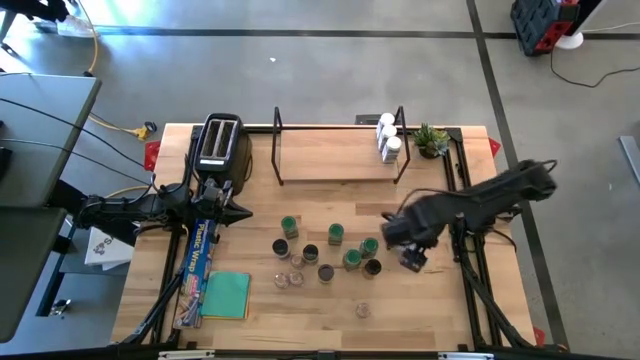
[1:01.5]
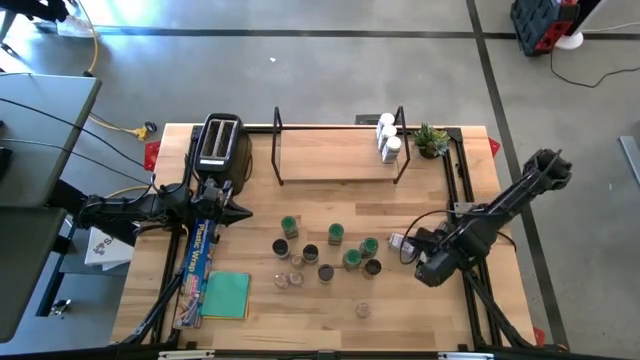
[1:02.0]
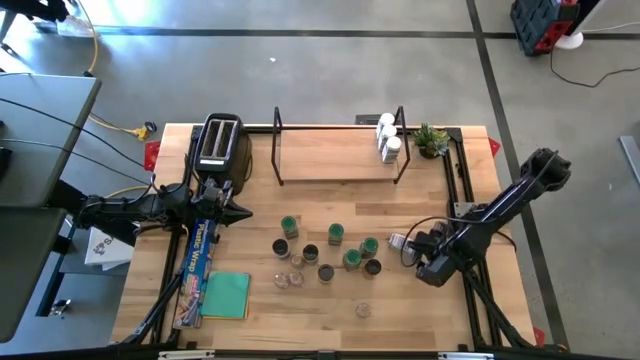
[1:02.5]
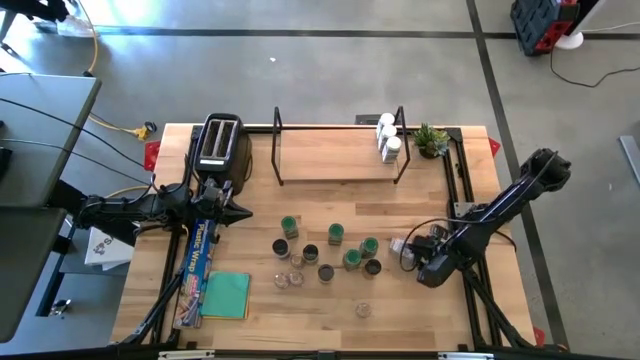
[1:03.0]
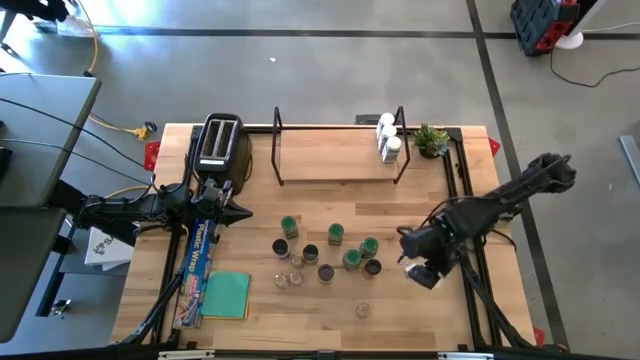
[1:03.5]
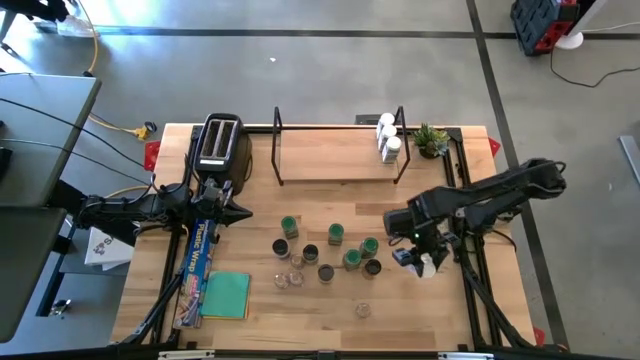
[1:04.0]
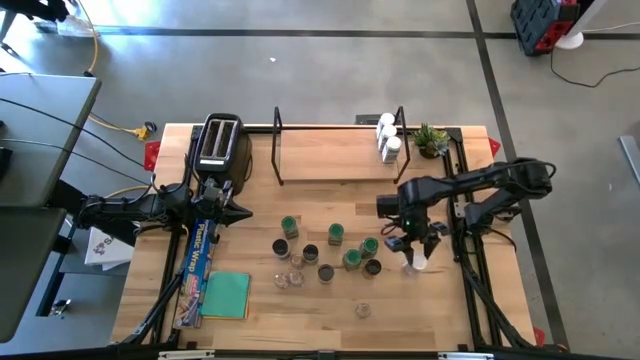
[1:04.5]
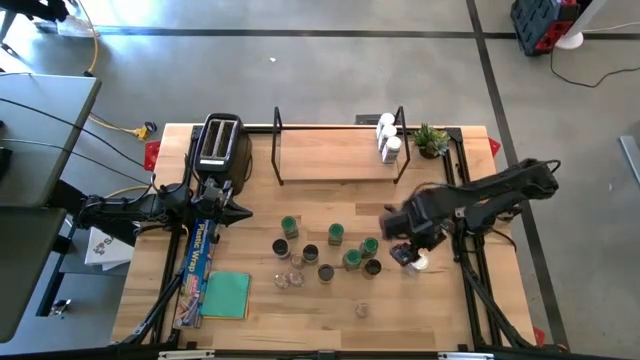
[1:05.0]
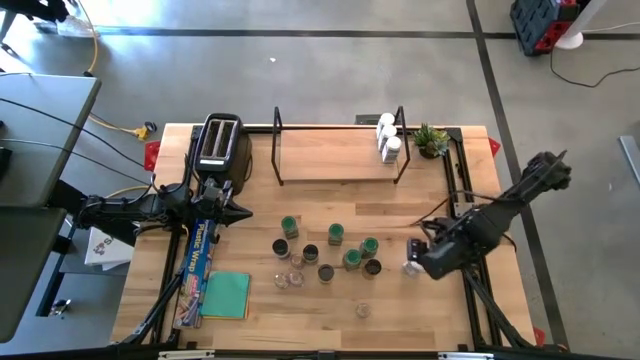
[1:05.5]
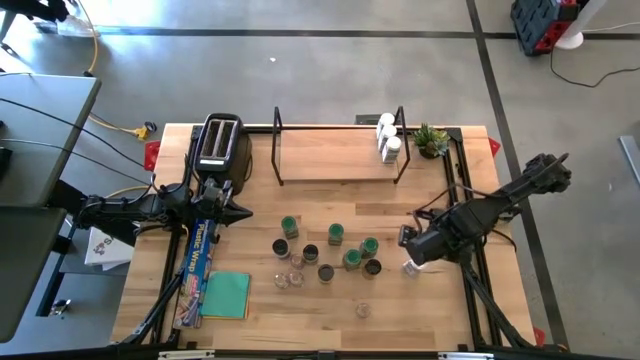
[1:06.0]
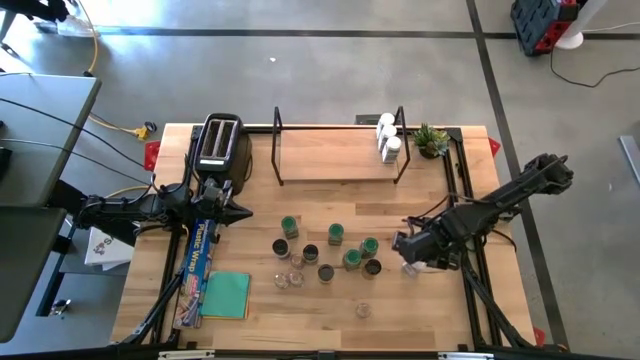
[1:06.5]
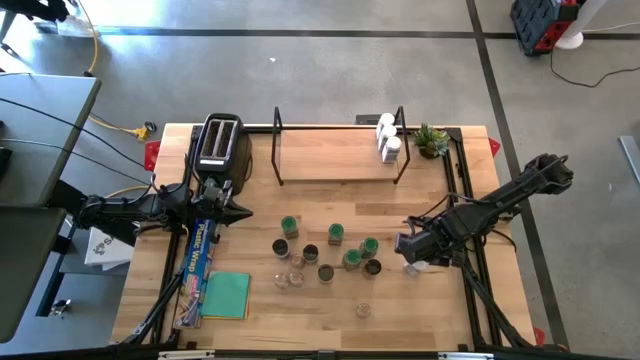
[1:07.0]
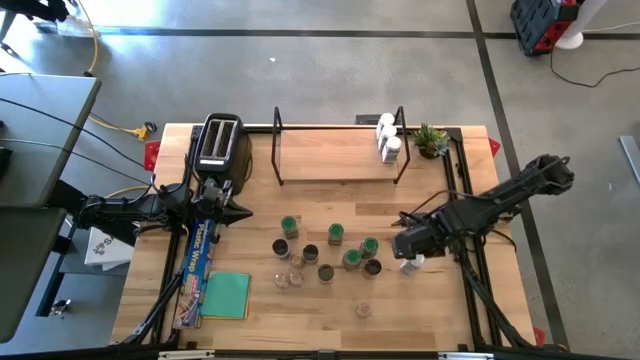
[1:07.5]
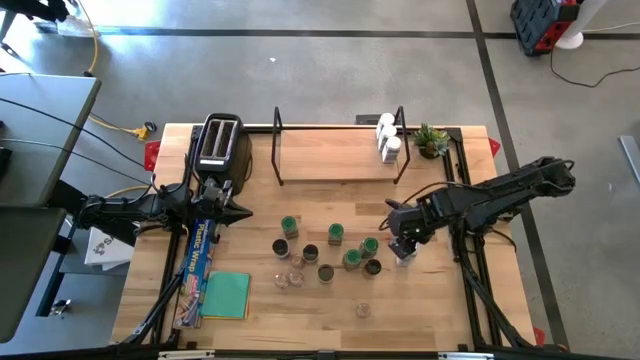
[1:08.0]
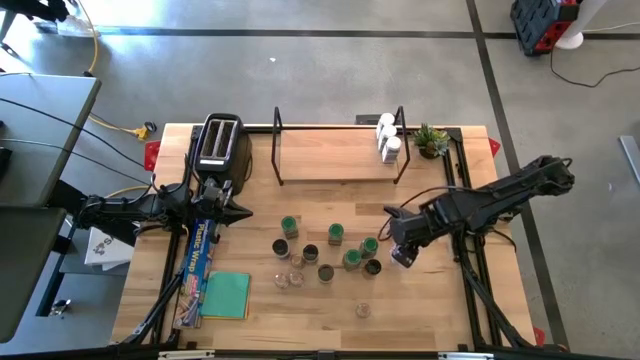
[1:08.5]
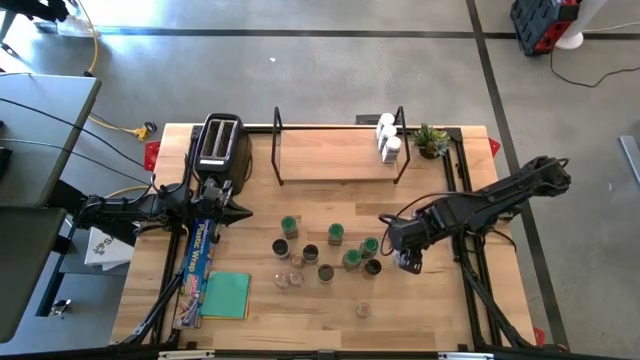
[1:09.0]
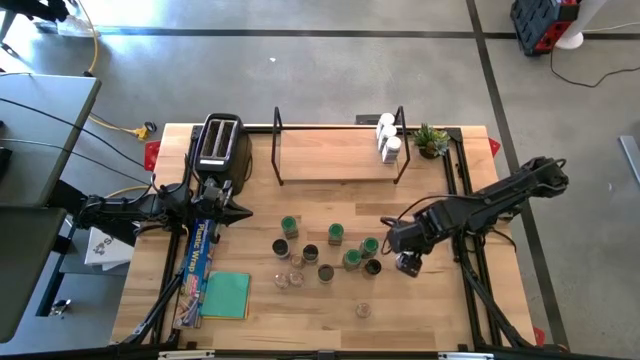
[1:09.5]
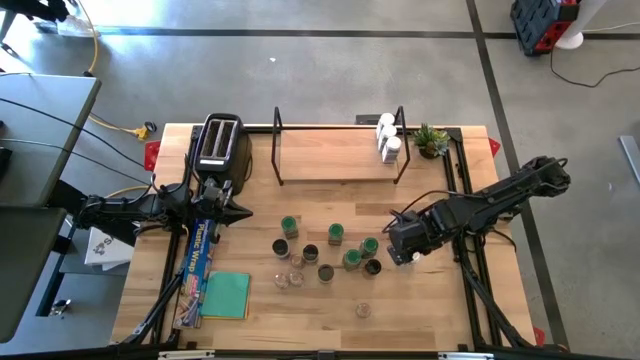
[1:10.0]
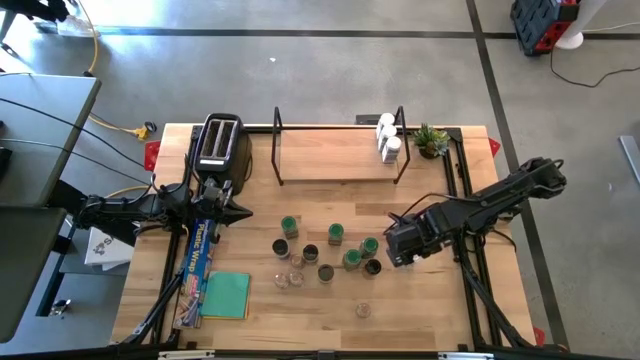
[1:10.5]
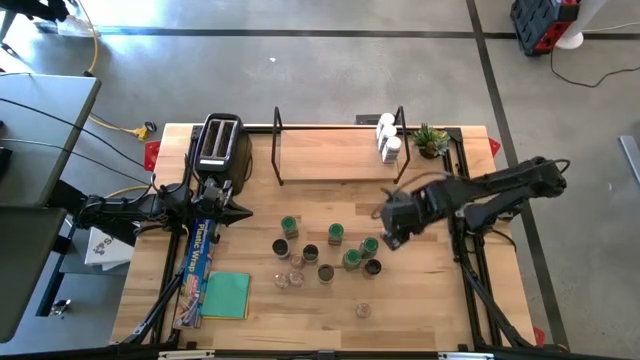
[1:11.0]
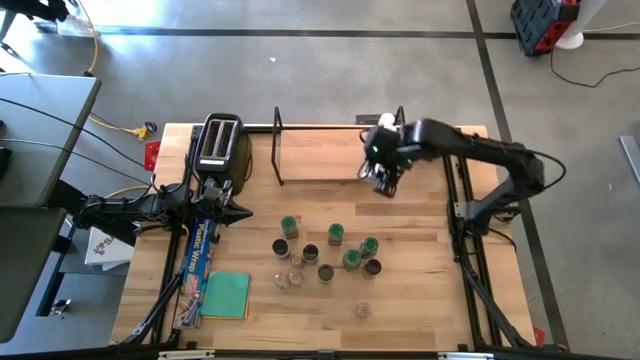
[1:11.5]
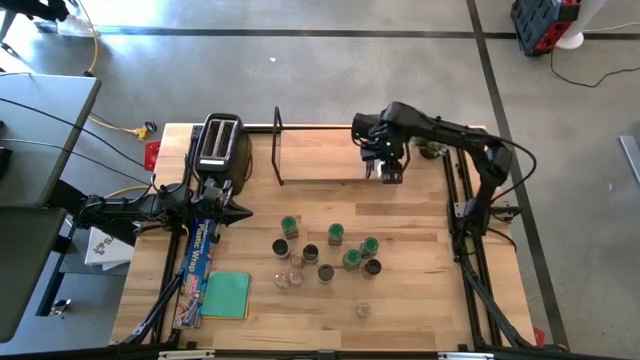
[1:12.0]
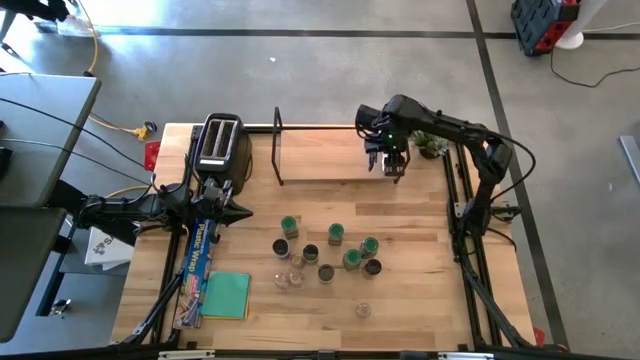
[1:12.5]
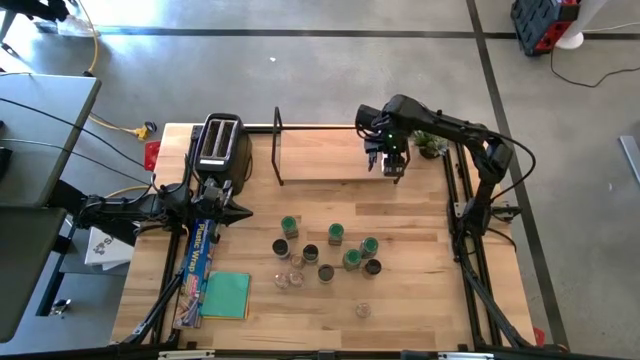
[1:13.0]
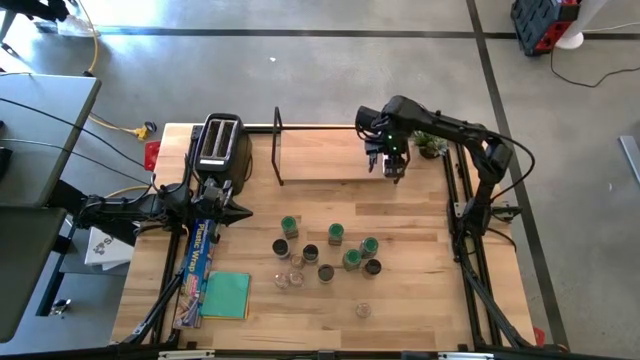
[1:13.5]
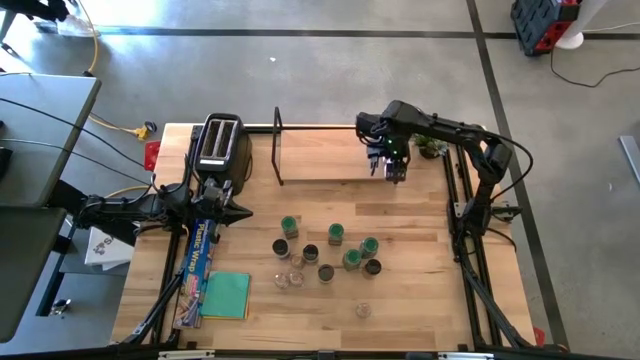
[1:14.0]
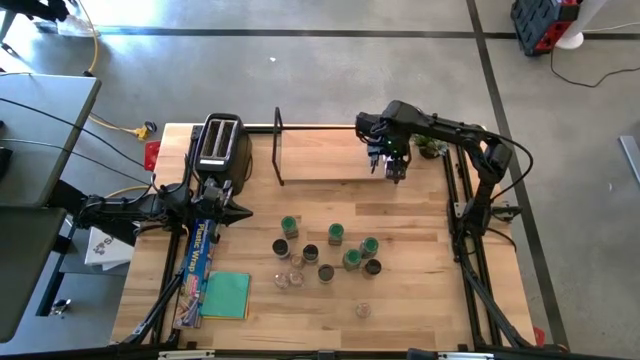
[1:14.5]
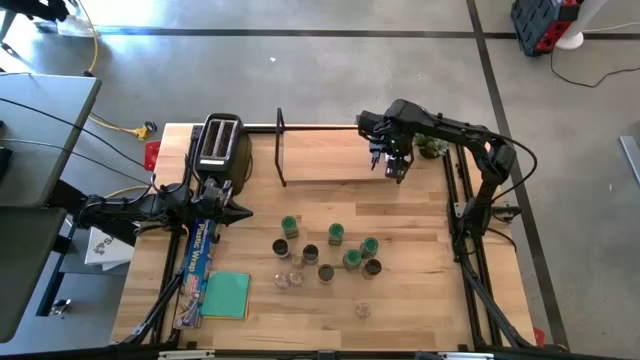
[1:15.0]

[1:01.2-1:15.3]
Task: Shelf spices
Put the white seasoning bottle on the shelf and align it with the other white seasoning bottles

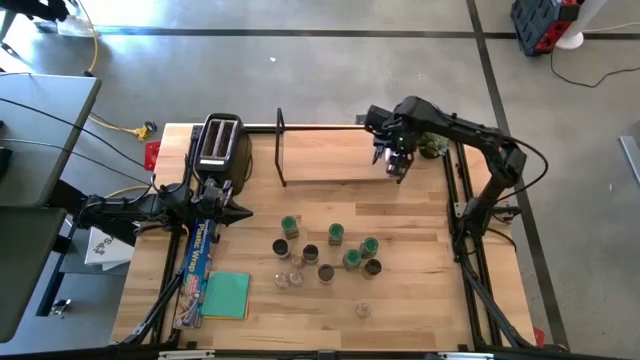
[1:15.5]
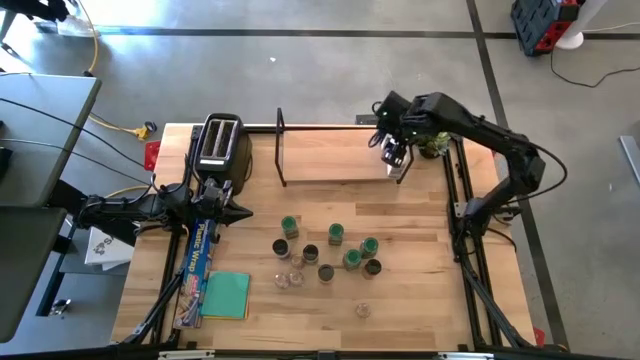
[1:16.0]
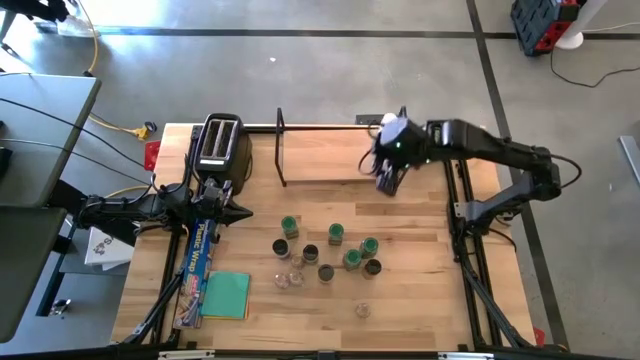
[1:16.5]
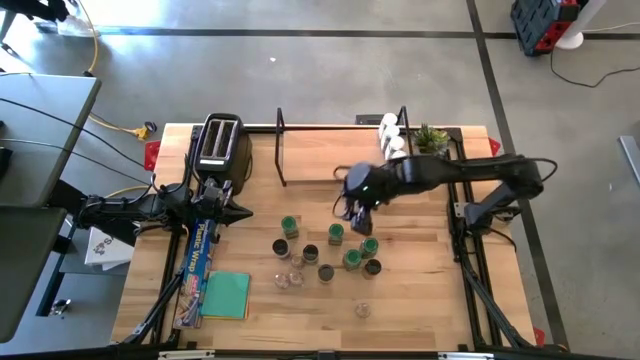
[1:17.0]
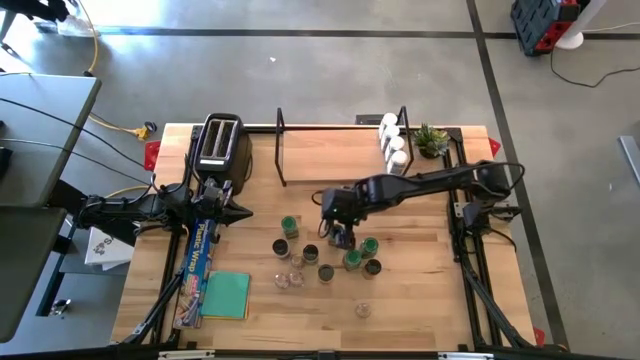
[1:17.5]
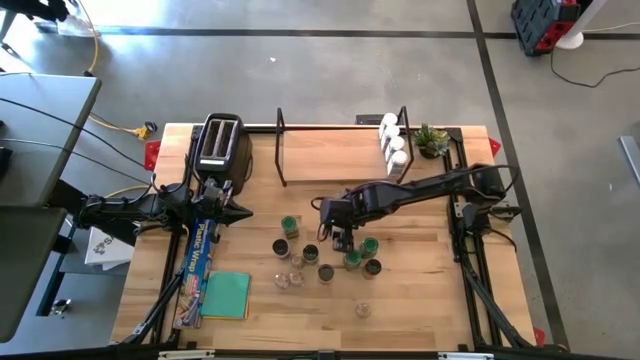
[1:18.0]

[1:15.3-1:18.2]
Put the green seasoning bottle on the shelf
